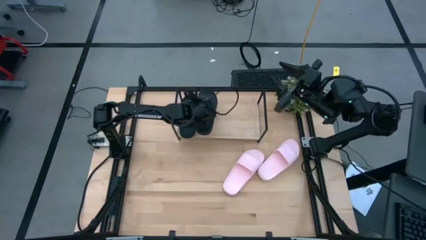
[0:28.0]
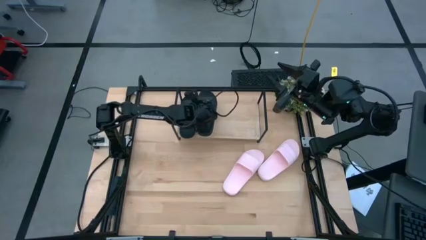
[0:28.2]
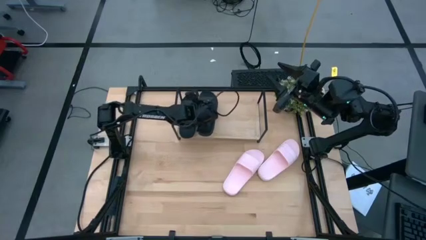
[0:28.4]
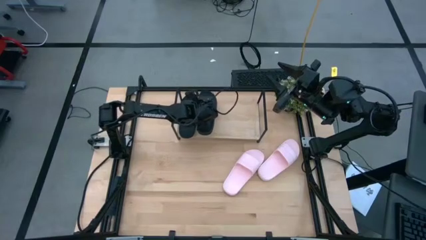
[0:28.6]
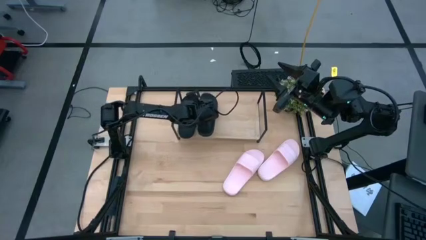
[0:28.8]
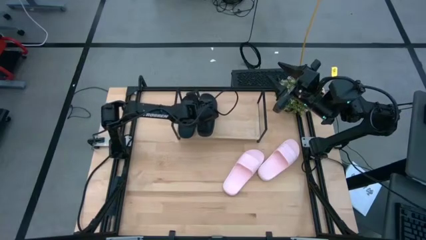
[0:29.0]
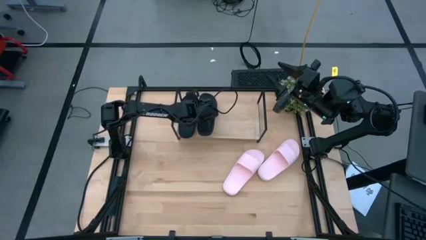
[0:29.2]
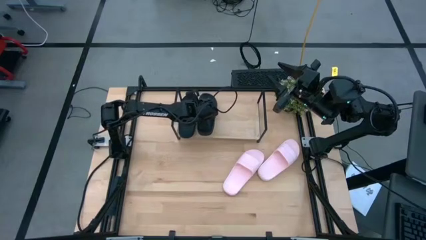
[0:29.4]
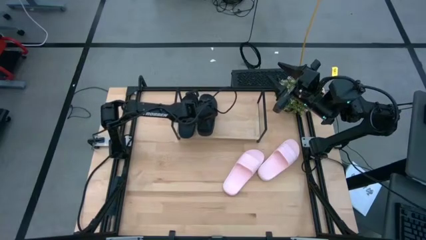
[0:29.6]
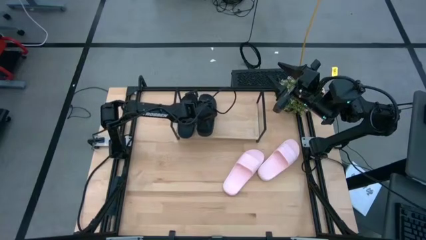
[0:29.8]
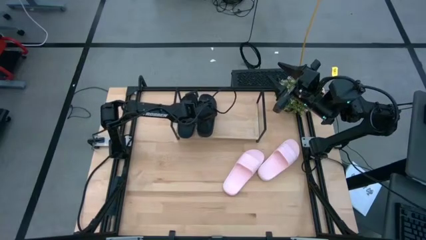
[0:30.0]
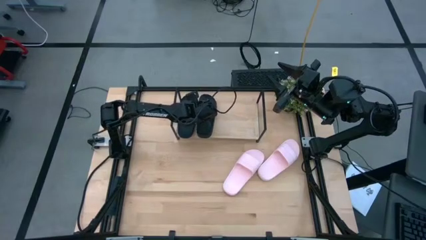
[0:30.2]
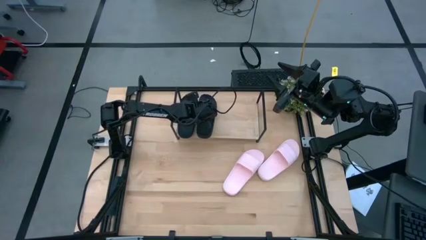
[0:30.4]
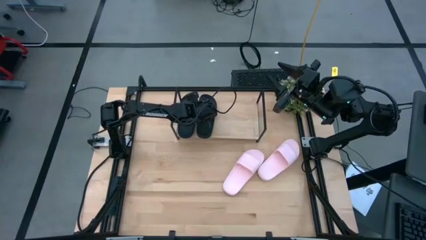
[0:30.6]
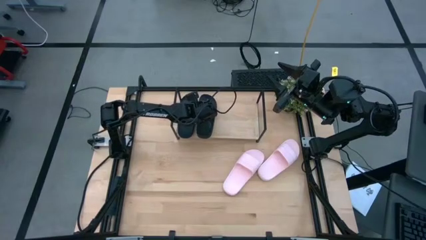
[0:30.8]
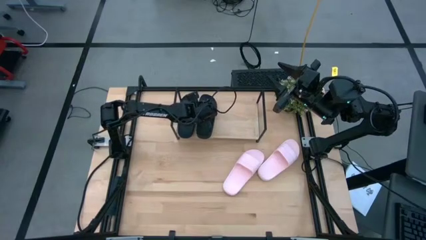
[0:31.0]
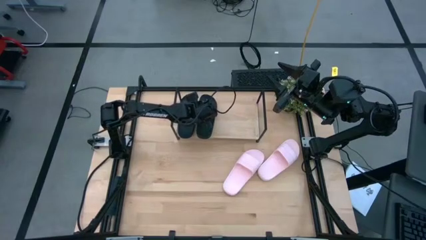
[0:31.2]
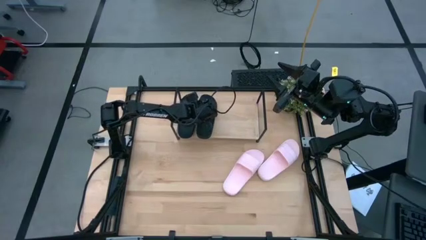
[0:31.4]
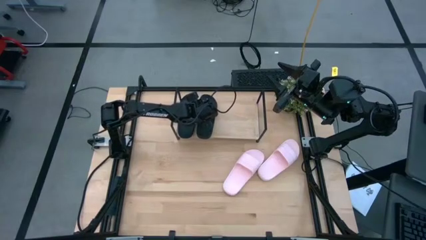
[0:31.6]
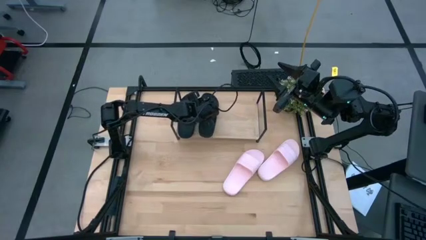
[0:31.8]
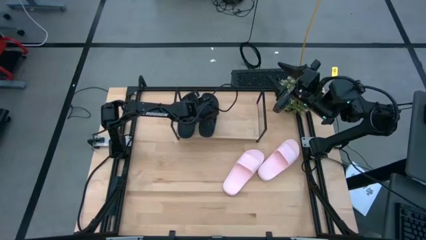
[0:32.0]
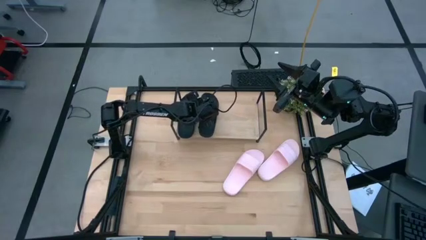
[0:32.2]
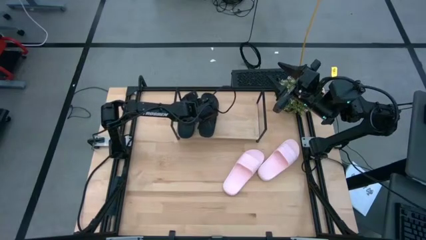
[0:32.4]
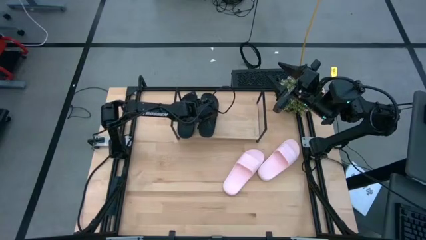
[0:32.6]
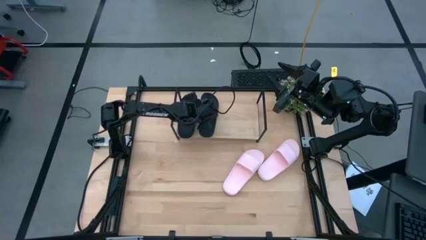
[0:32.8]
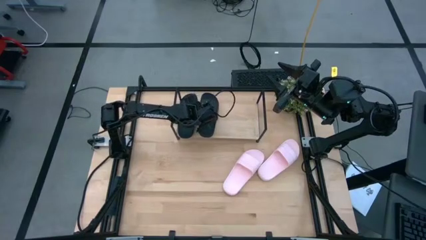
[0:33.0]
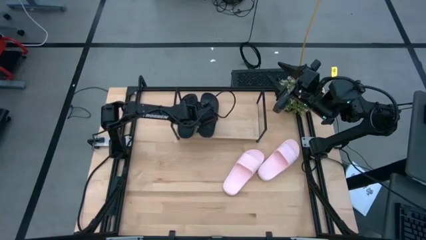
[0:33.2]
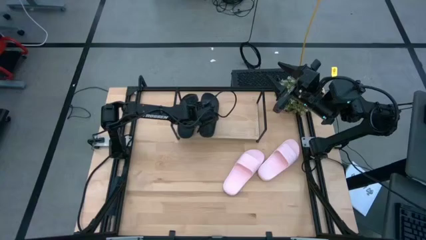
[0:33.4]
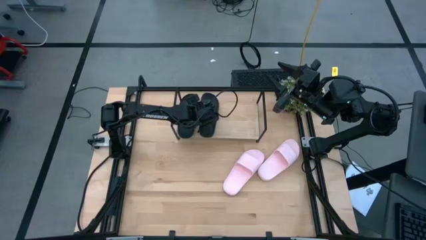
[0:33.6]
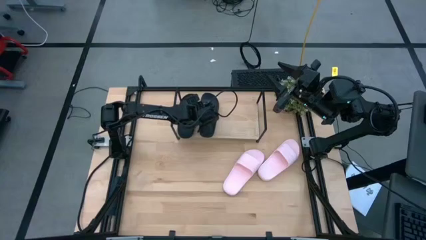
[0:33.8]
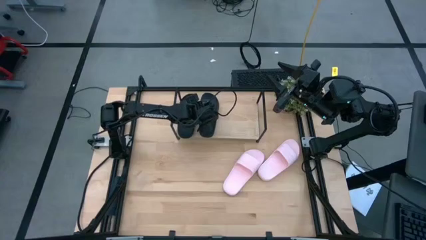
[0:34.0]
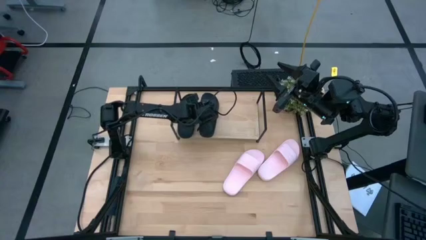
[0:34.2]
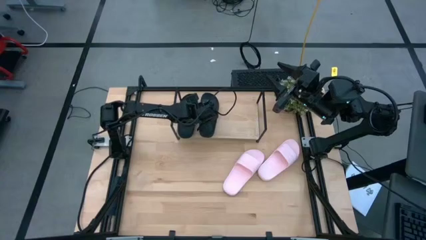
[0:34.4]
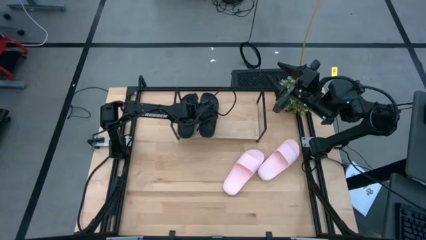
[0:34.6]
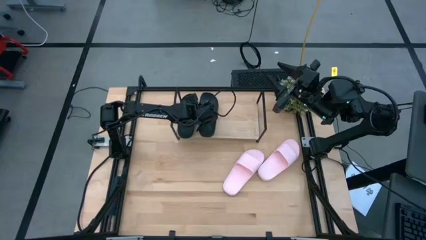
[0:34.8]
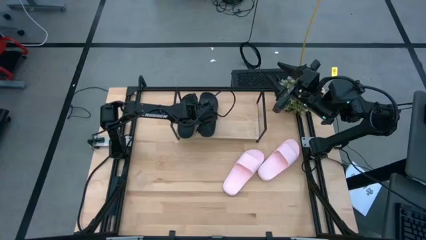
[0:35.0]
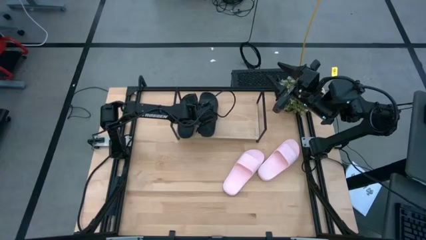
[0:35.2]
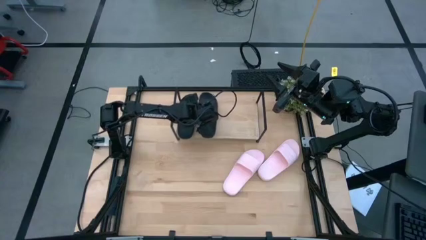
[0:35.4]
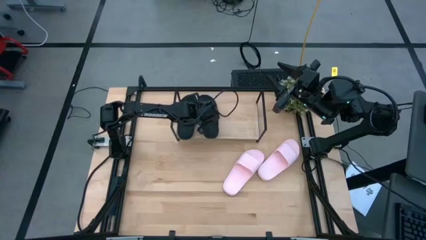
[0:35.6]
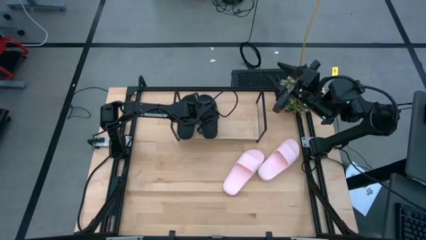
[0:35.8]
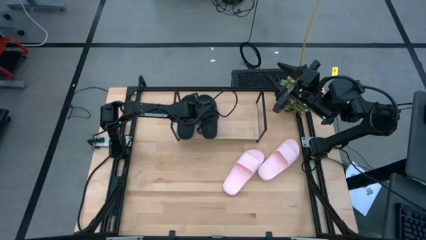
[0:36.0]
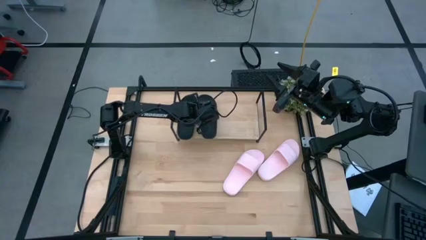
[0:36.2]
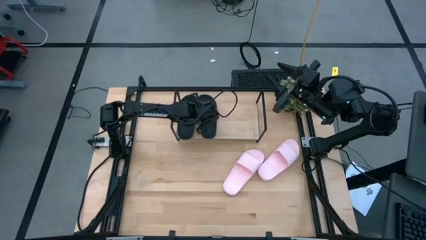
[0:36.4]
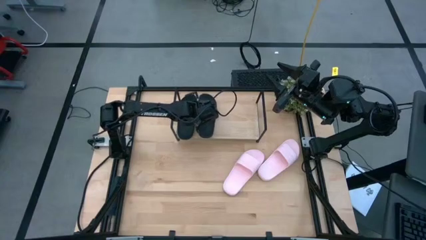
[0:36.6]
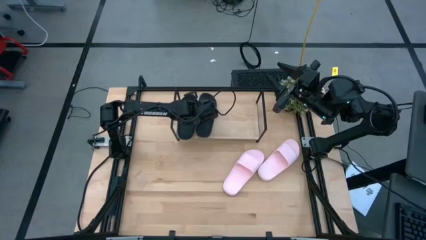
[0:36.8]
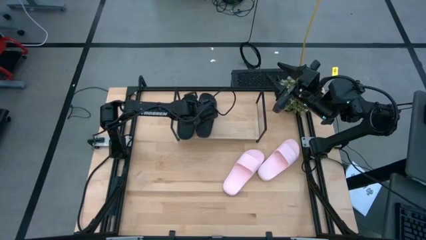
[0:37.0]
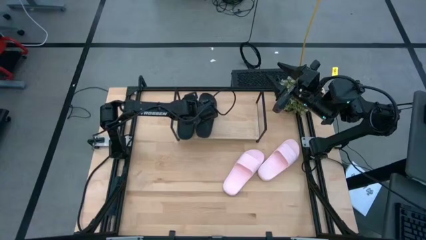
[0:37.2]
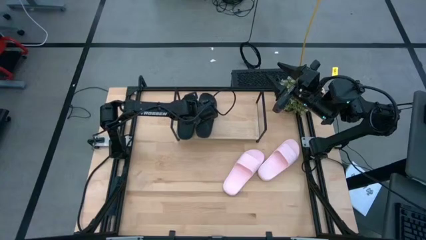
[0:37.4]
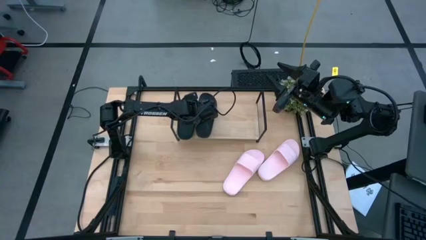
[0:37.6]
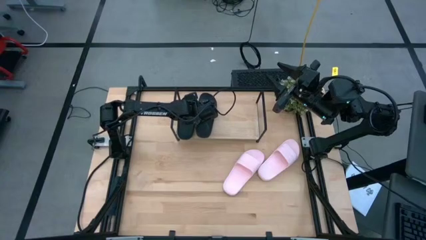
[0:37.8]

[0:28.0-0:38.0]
Task: Pick and place slides into the shelf
Put the black slipper on the shelf

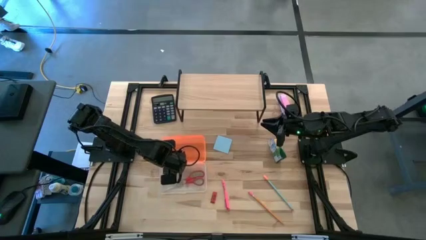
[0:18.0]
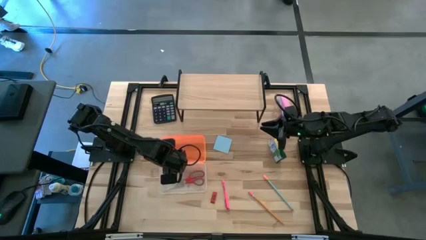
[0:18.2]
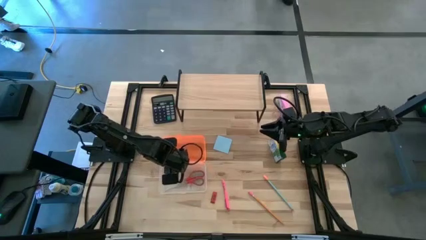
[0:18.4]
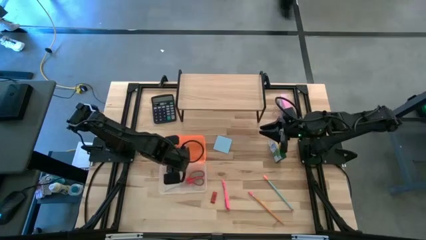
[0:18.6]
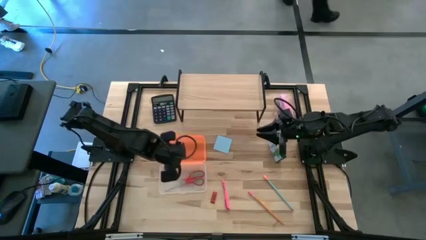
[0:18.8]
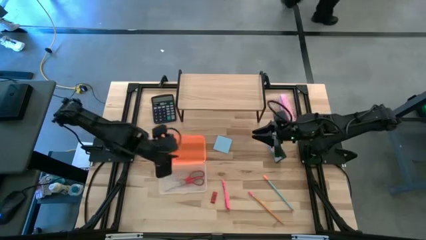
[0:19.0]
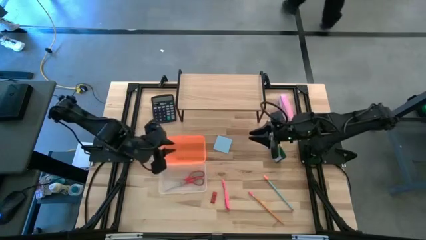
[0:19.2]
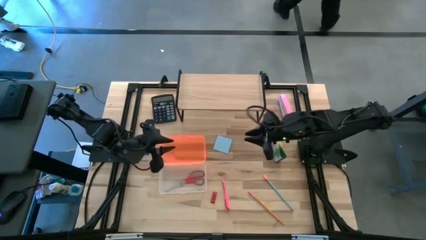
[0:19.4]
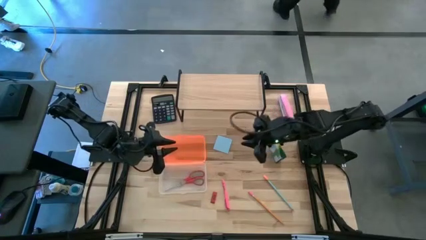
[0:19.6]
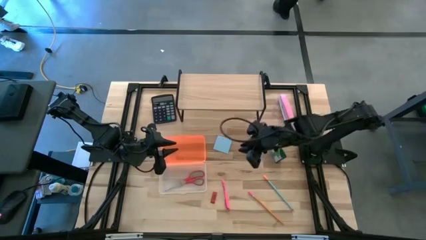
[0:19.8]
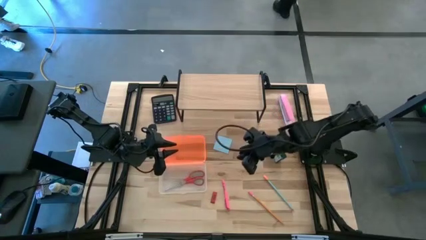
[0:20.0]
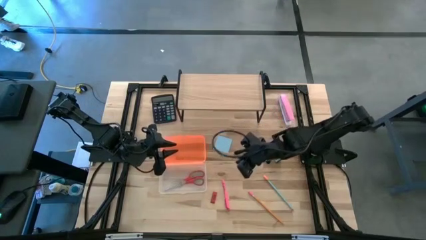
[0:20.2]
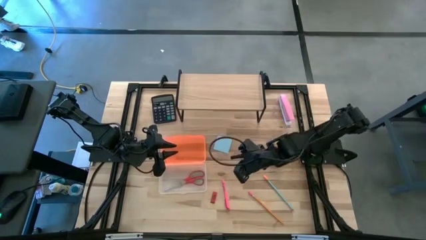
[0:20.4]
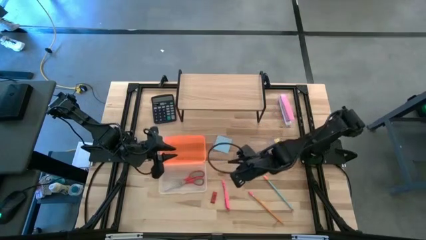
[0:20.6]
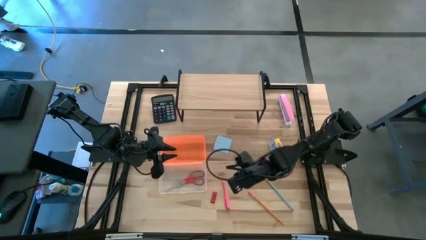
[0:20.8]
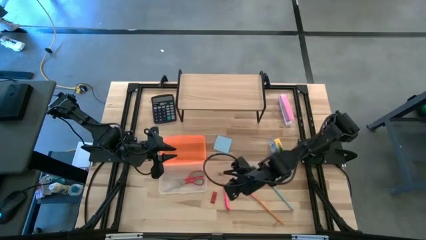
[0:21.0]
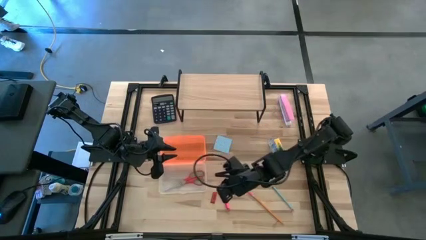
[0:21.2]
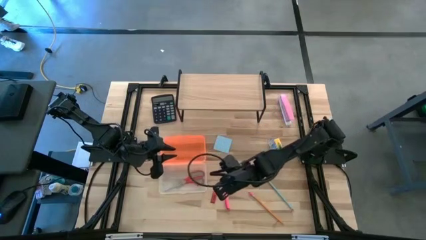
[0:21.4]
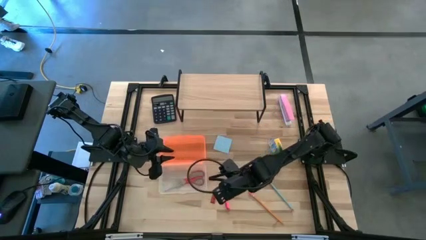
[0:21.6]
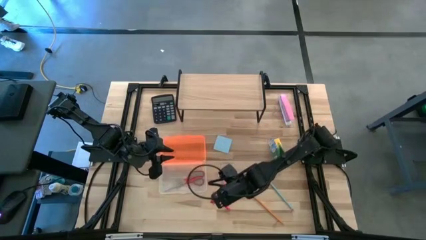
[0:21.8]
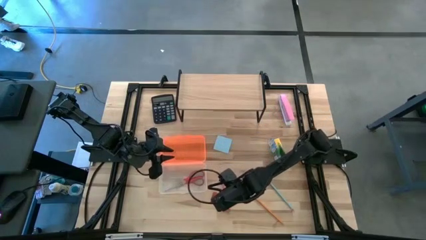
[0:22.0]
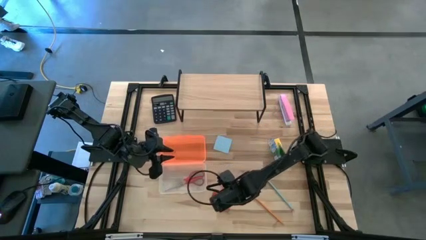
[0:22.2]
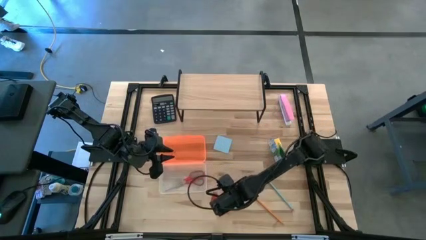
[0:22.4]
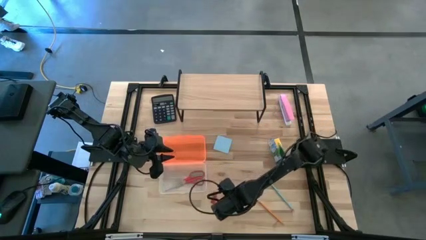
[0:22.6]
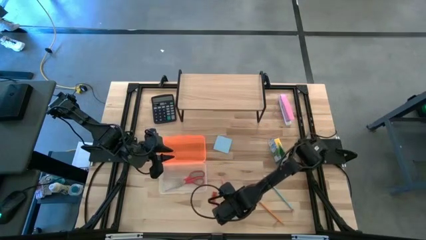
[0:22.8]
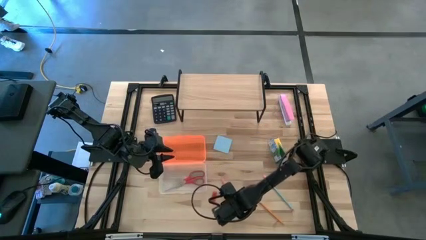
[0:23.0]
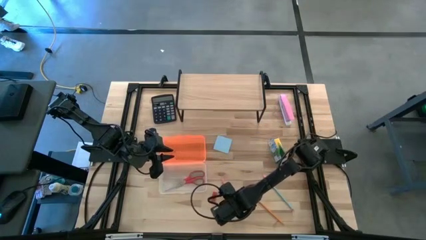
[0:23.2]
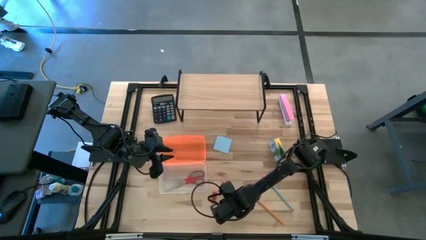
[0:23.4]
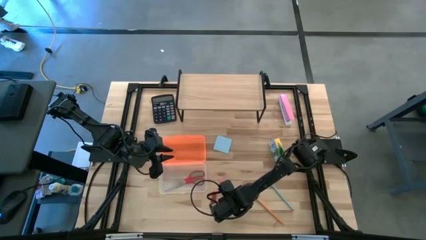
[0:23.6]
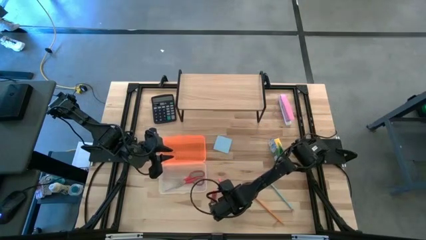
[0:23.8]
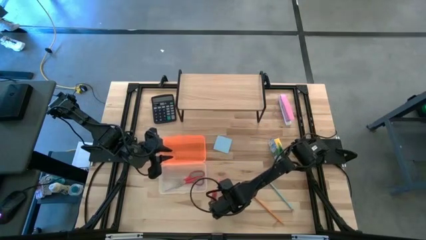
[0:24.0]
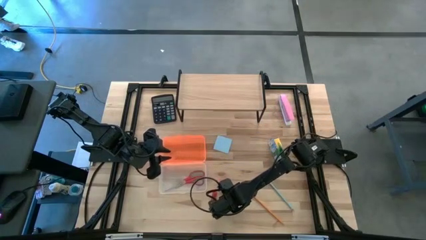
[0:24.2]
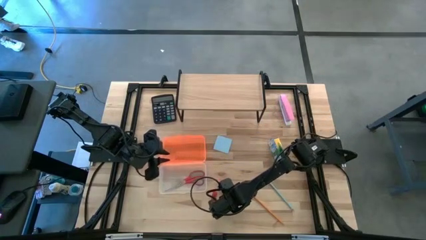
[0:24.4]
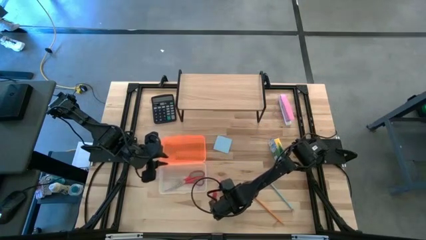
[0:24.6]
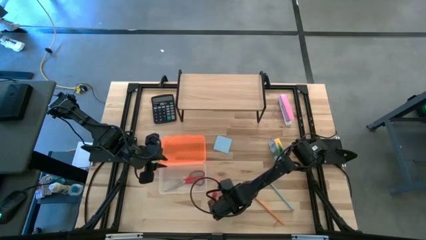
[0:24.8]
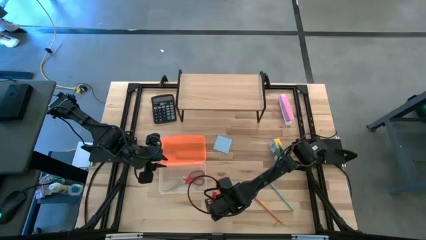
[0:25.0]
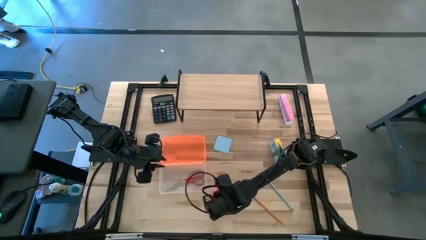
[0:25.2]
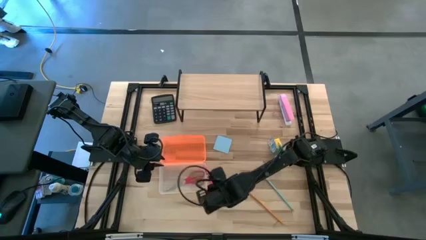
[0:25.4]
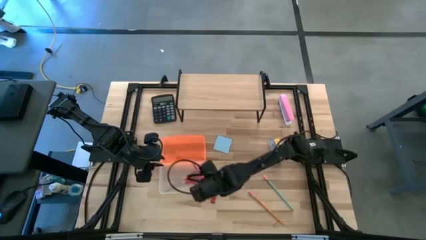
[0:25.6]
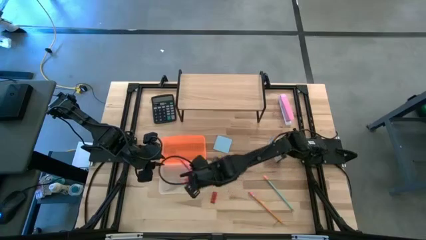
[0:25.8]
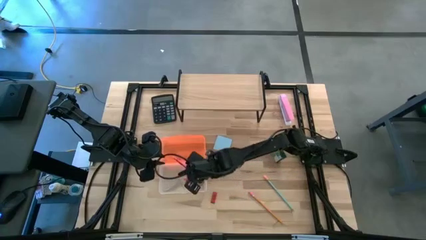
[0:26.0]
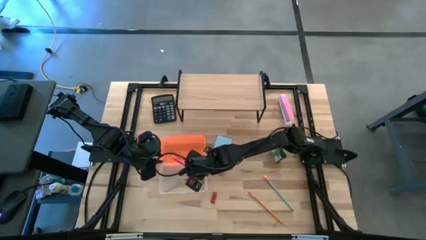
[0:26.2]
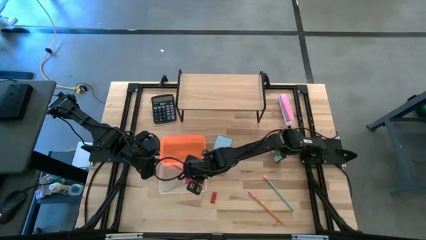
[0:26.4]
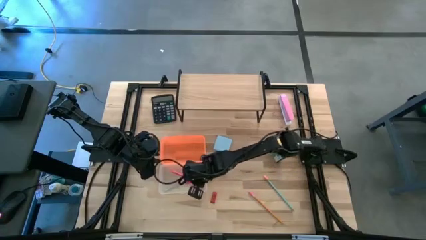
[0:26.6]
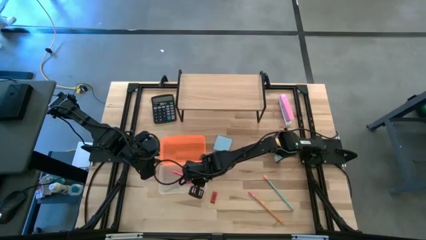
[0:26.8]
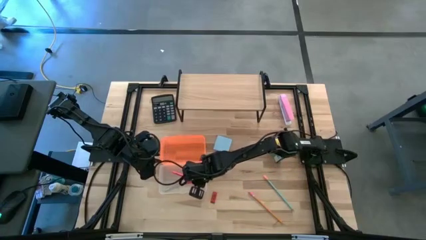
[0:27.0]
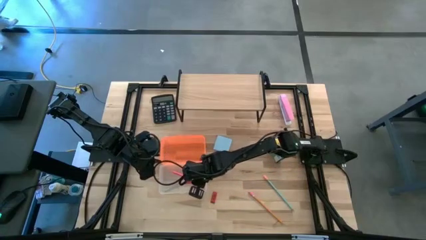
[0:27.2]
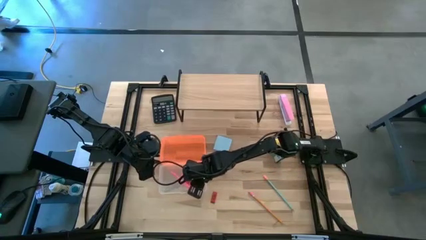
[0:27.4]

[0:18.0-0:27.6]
Task: Pack school essentials
Put the pink pen into the supply box
